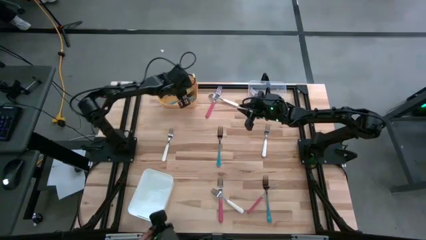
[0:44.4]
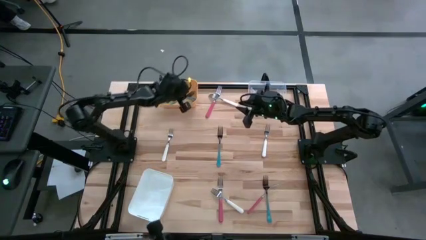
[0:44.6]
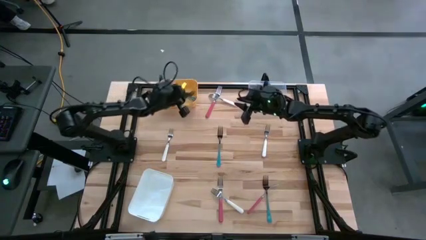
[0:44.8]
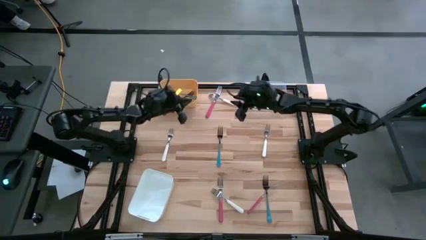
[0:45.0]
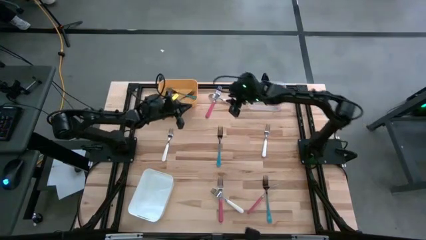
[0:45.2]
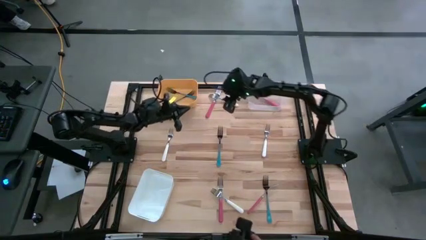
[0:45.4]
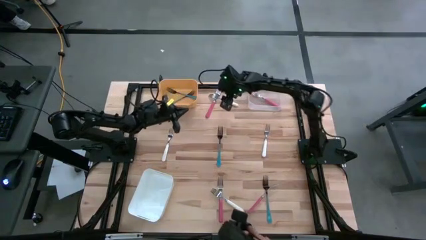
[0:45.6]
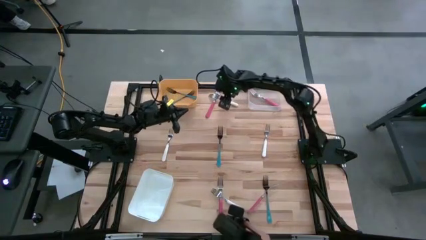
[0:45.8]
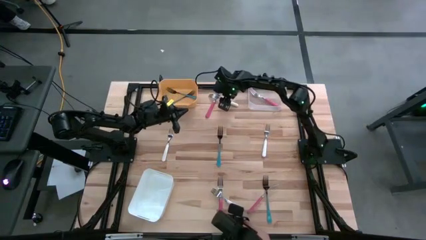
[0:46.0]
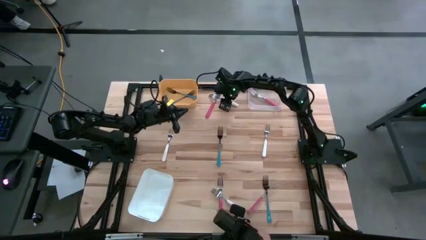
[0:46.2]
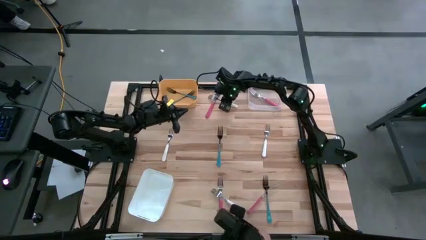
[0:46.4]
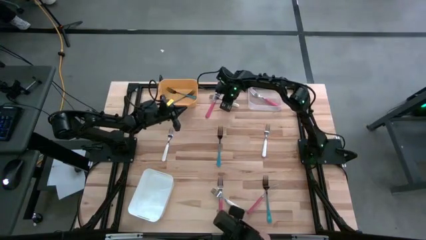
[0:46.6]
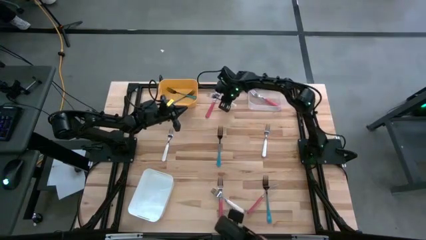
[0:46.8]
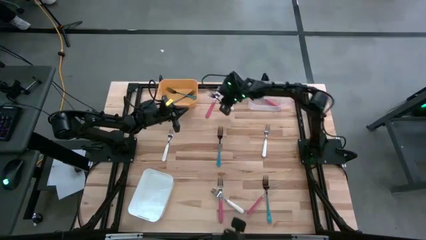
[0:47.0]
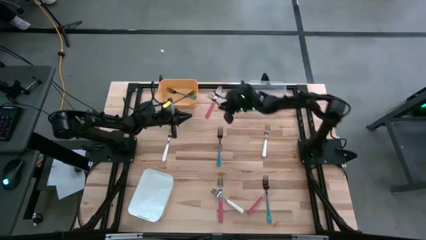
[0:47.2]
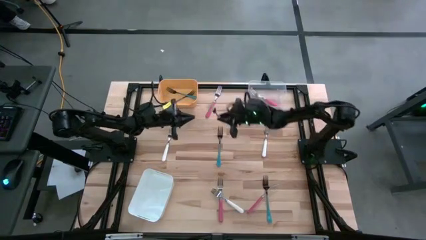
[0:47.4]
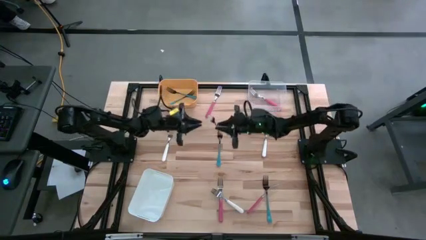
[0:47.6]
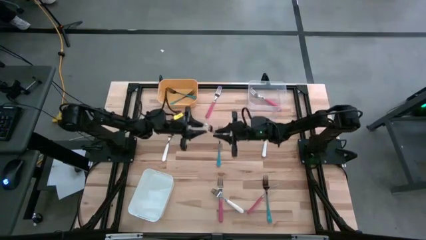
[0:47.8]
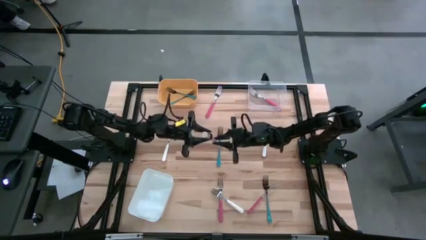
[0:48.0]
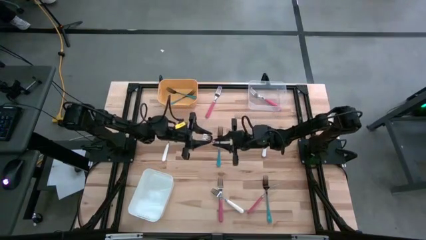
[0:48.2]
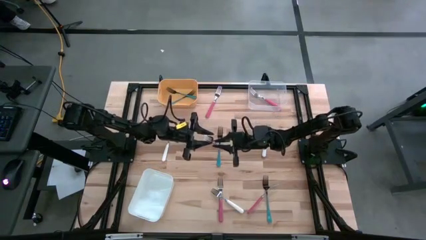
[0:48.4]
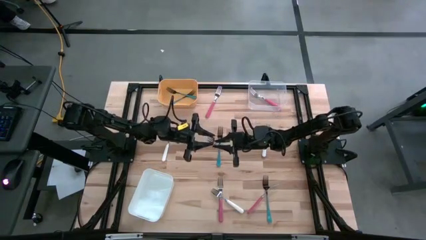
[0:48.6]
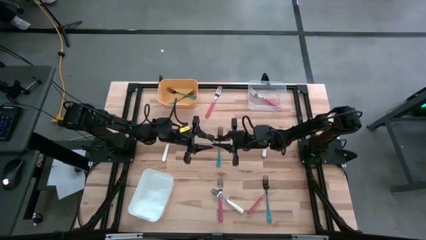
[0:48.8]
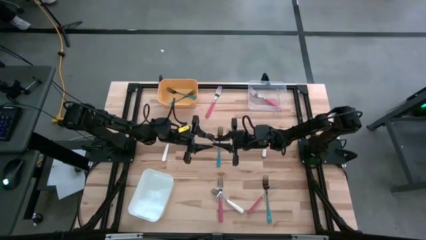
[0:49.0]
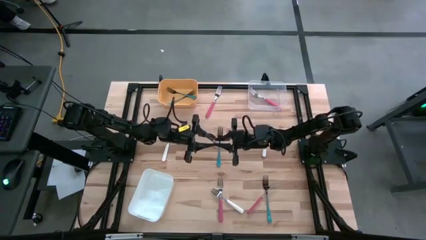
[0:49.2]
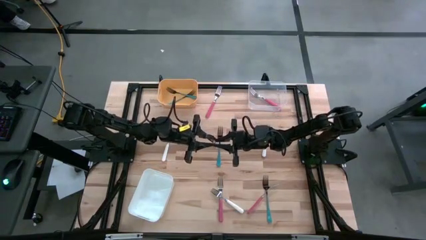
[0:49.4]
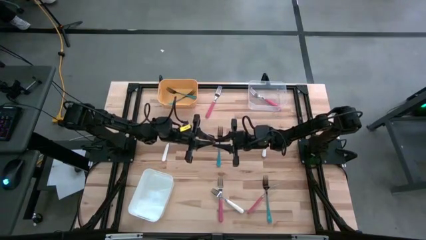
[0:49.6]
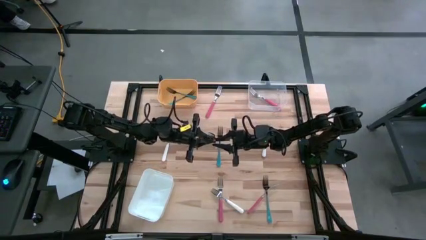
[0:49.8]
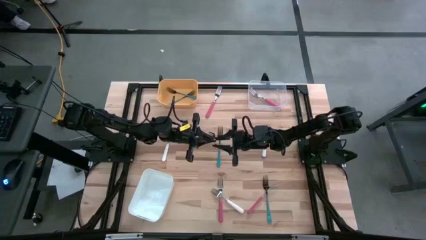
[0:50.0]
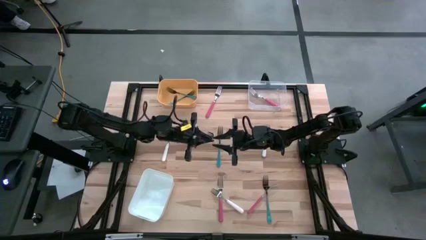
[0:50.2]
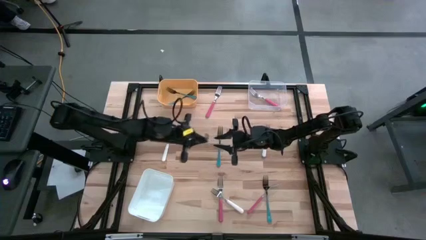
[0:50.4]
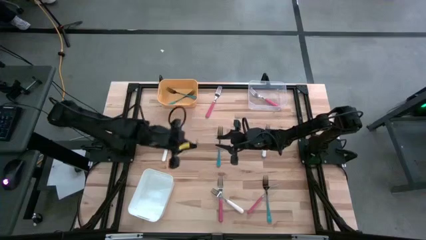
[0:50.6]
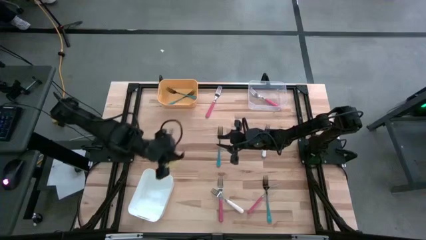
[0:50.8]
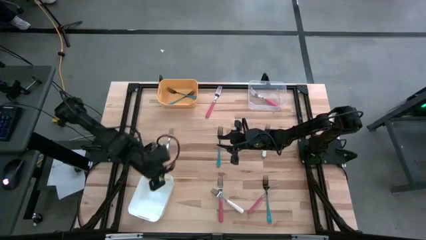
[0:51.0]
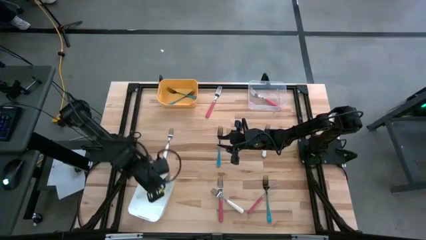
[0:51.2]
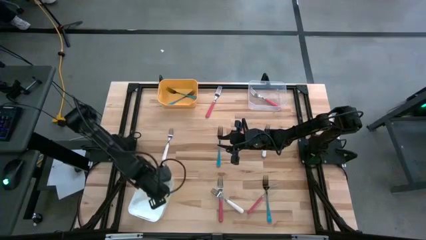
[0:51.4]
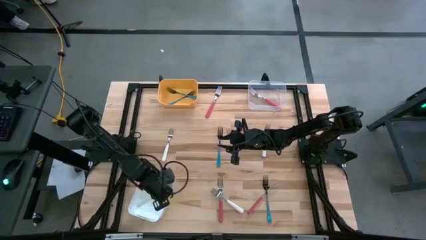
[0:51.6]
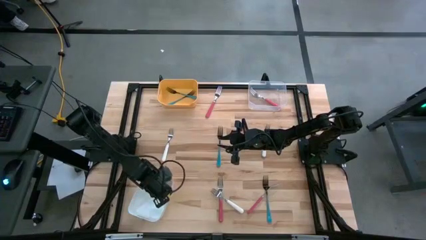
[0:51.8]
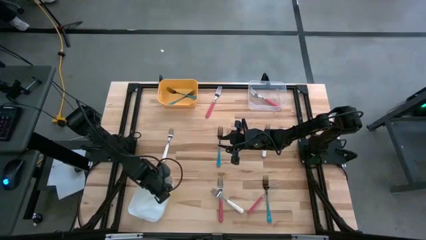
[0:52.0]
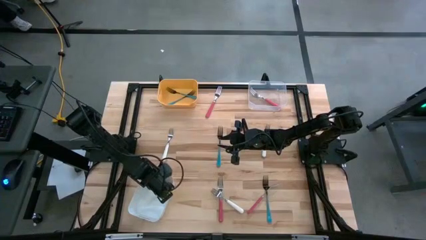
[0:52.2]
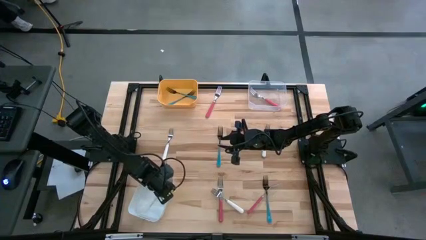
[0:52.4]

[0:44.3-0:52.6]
Task: Sort silverware by color (type)
Put the white fork into the white bin

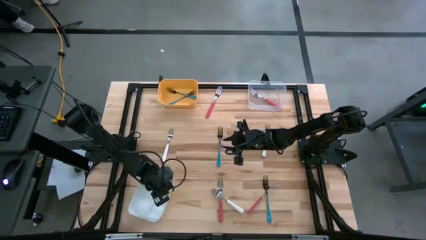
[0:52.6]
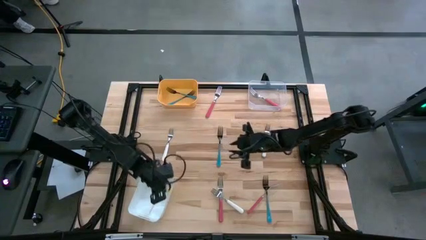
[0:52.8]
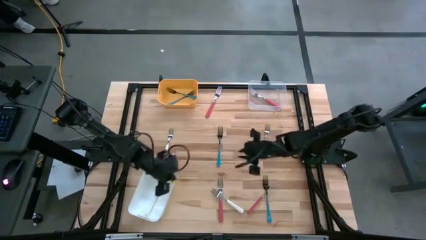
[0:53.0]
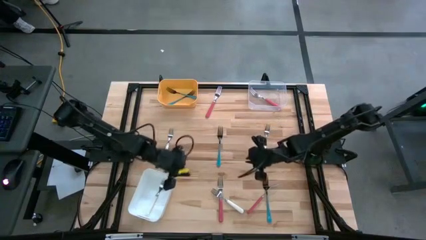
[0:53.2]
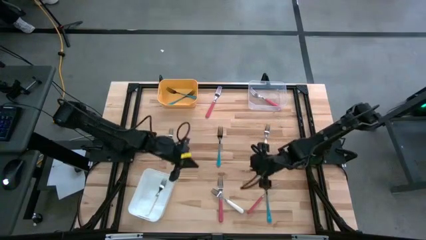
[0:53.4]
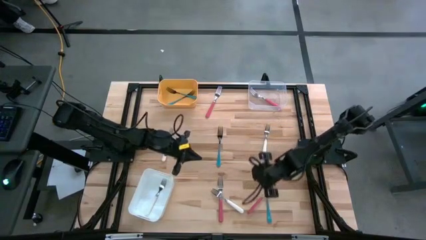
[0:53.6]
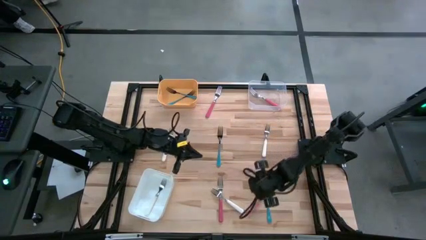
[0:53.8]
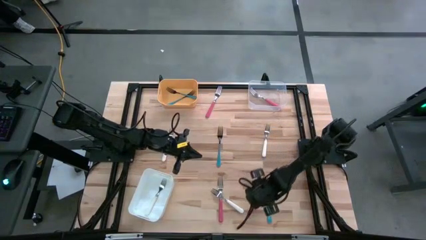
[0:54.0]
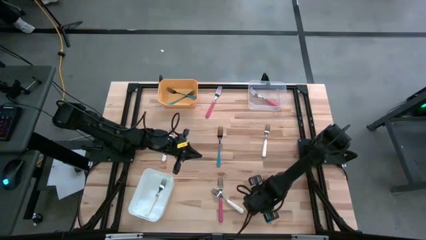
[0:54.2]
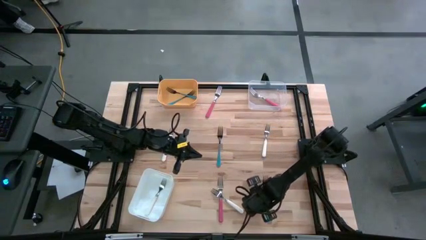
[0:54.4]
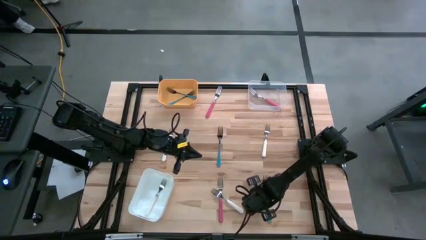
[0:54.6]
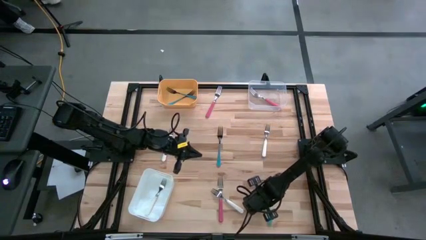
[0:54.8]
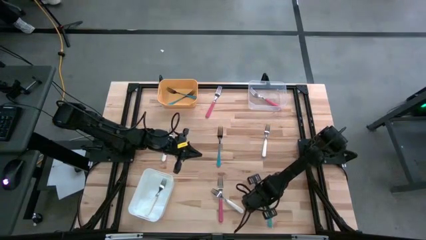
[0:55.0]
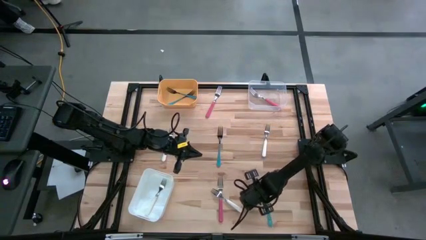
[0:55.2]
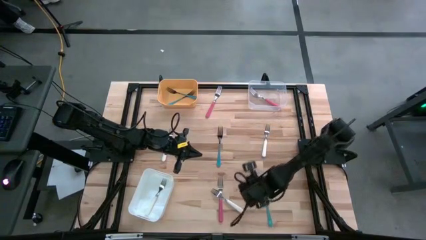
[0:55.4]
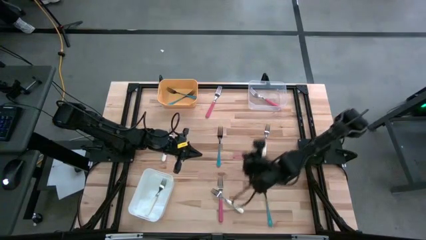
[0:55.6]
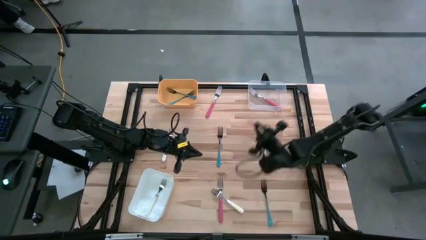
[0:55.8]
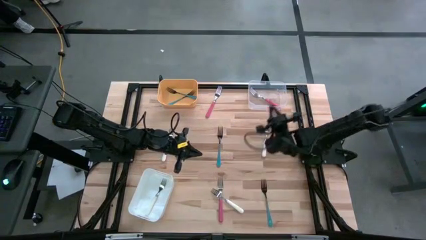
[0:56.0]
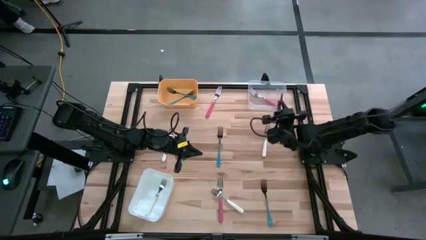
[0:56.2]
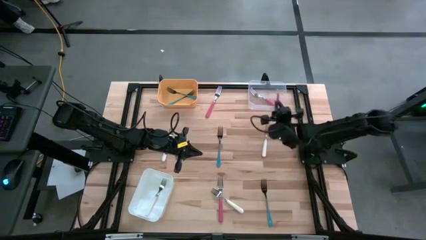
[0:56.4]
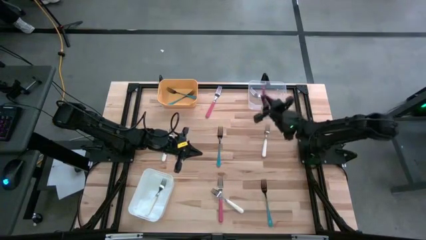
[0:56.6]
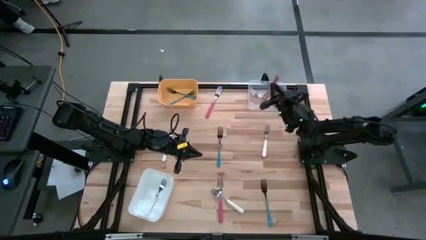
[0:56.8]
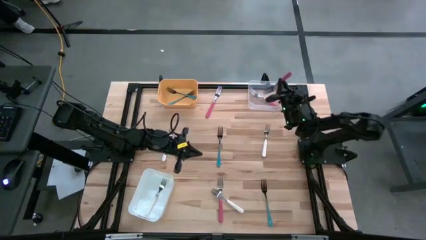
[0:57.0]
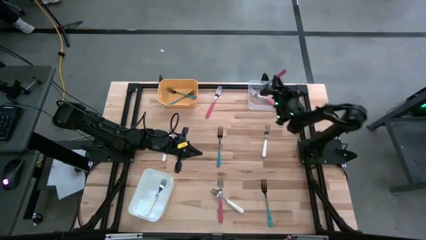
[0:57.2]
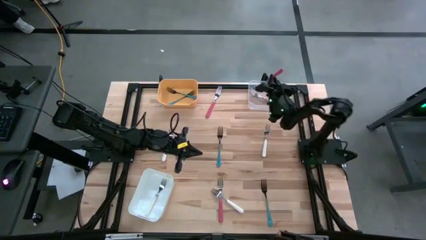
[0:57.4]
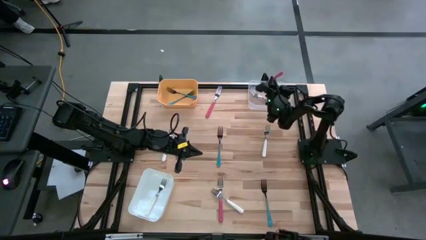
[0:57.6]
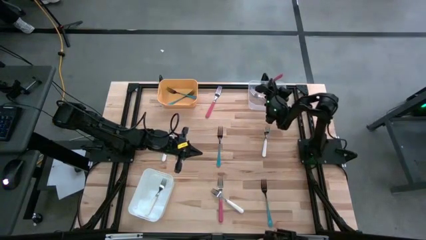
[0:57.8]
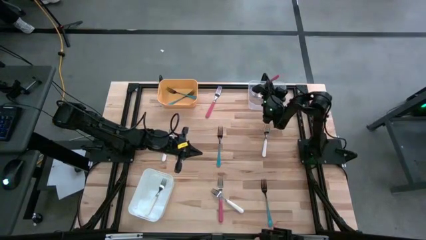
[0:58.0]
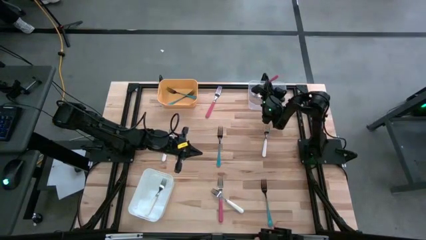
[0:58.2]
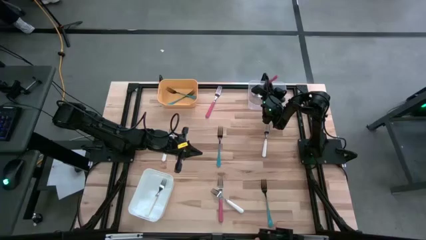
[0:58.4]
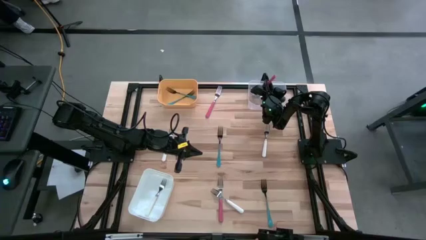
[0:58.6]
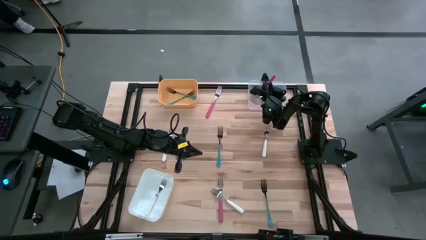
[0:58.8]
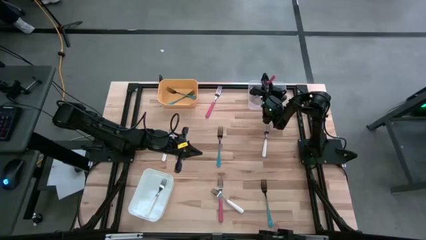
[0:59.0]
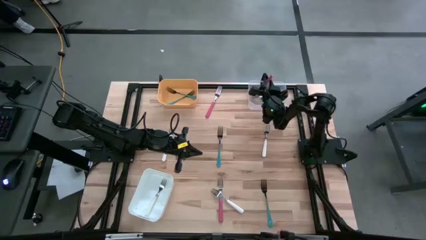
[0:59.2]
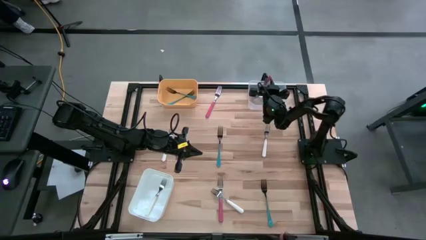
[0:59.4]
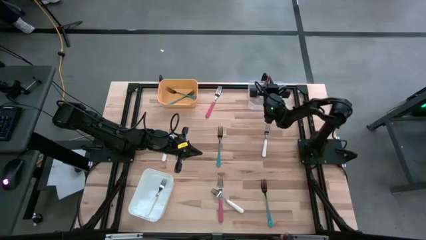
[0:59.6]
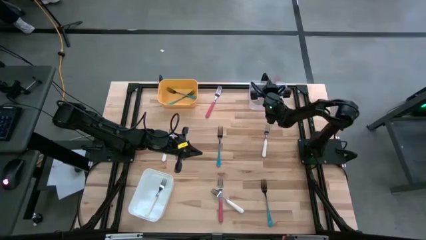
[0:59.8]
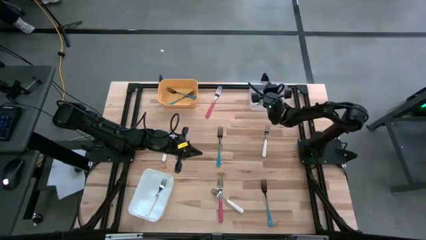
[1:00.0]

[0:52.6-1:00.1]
Put the pink fork into the transparent bin
